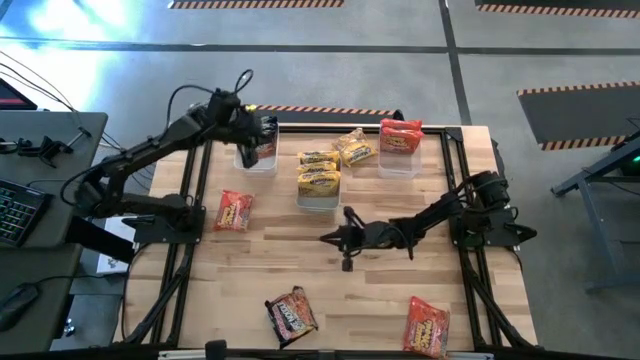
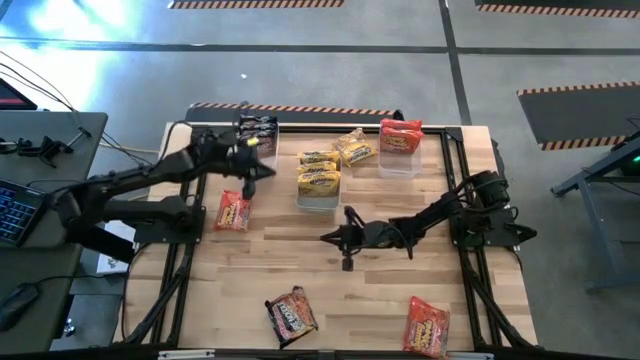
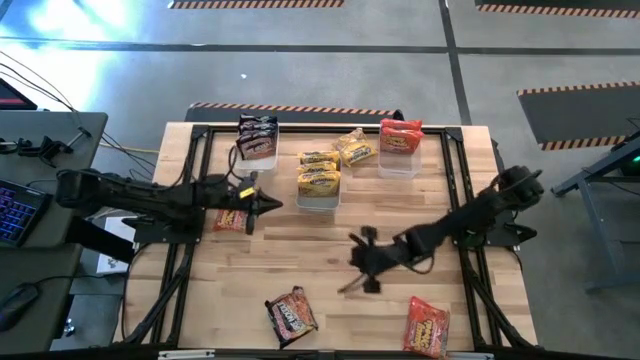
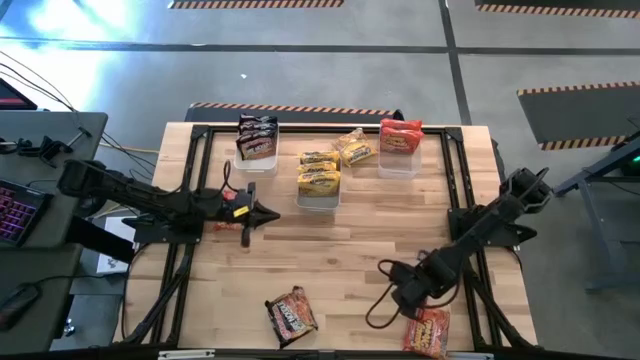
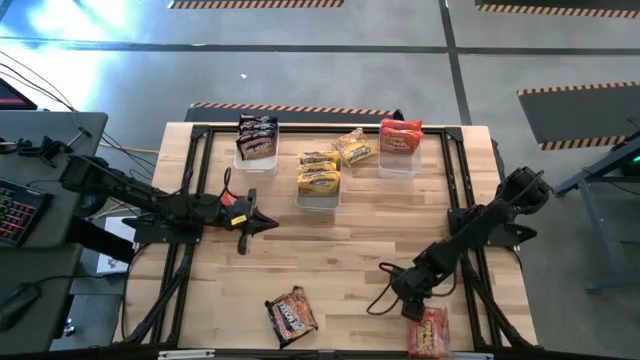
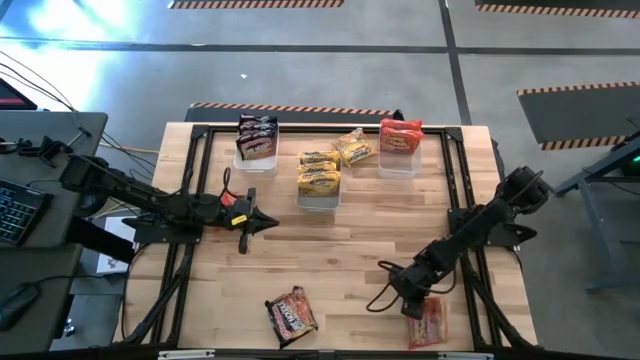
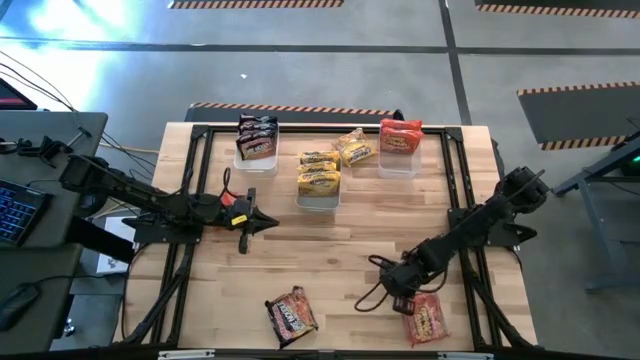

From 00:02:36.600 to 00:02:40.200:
Task: Sort Maruchan noodles
Put the bottom orange noodle pack into the transparent bin

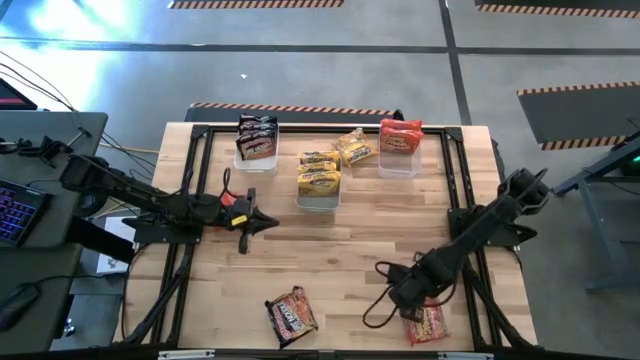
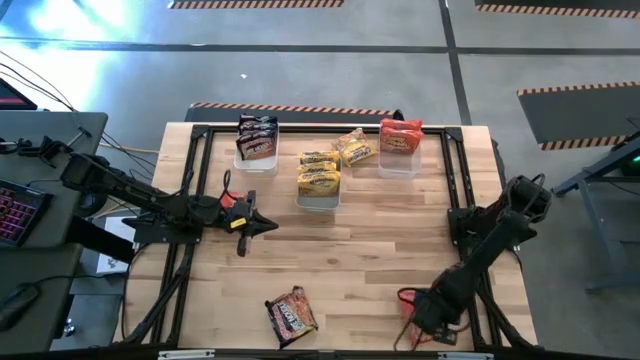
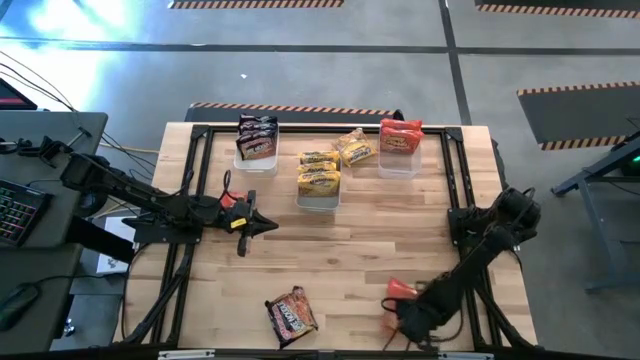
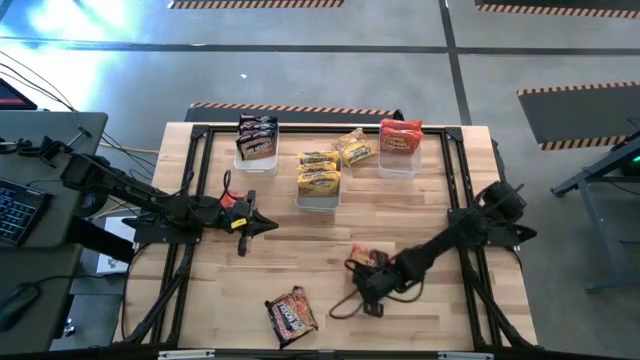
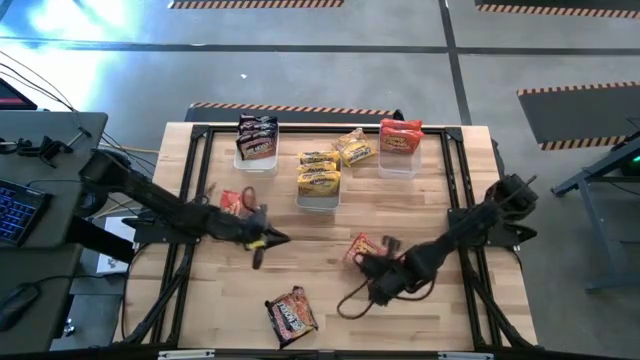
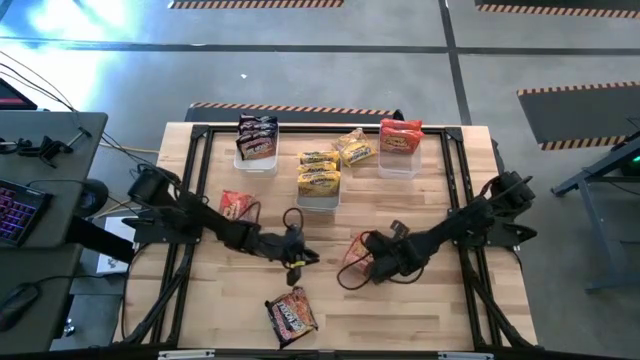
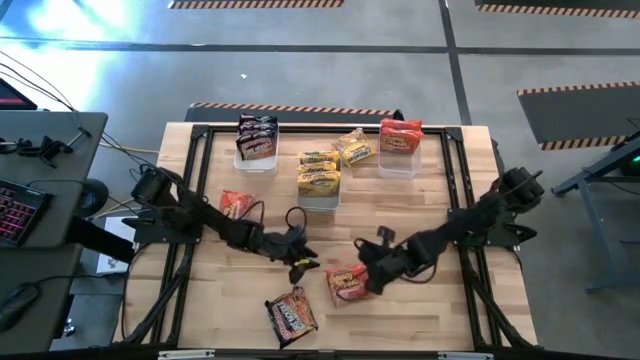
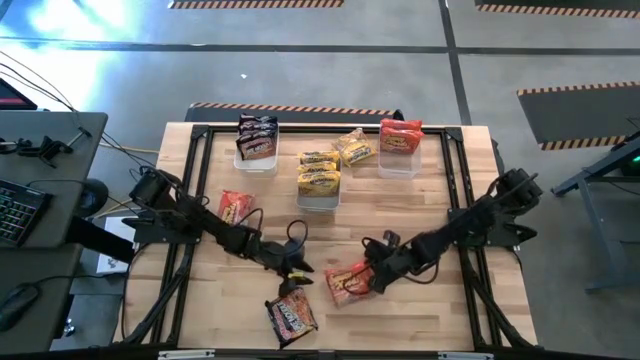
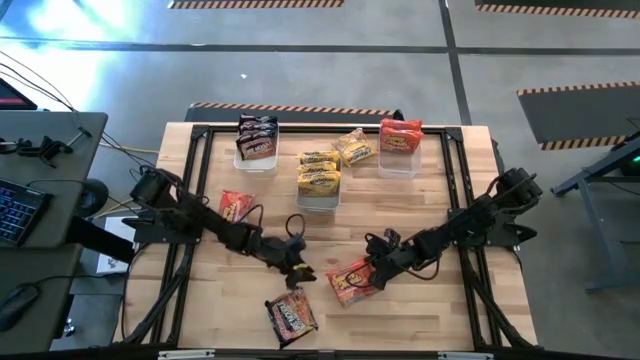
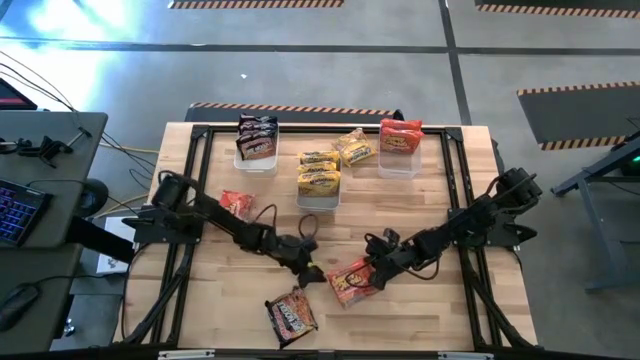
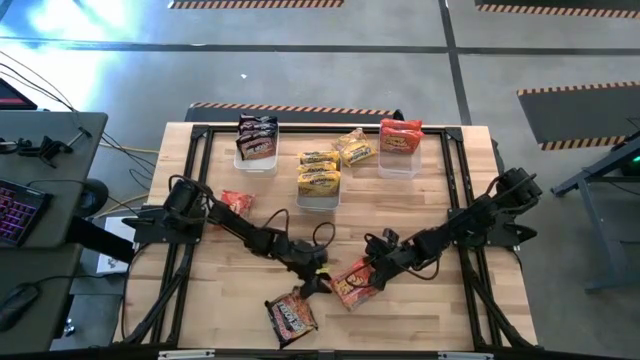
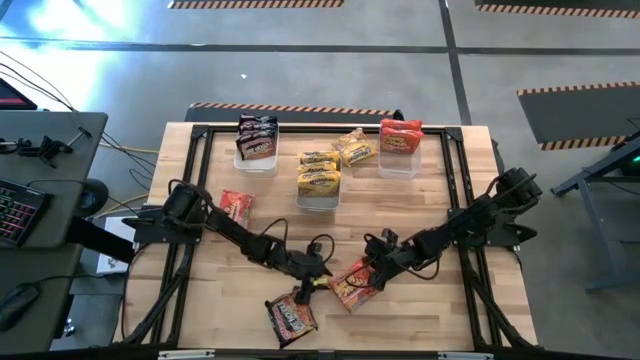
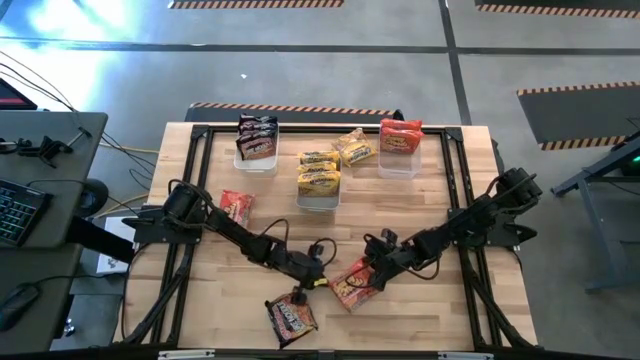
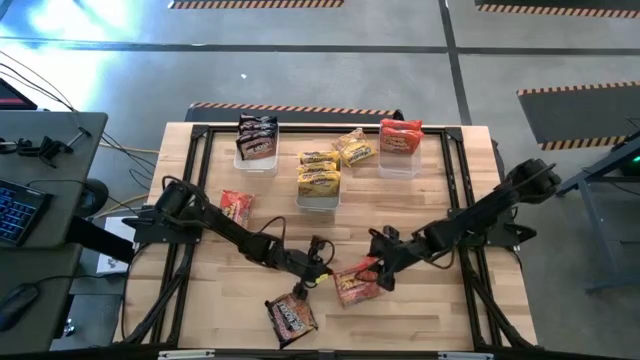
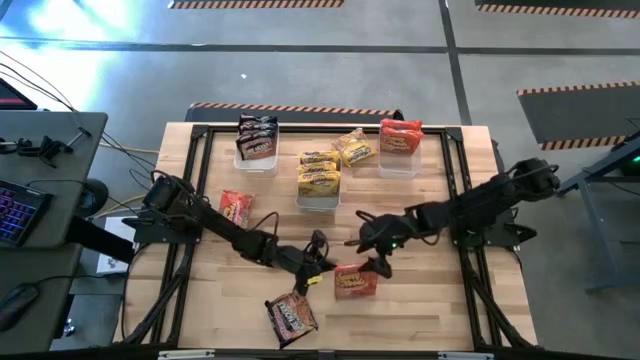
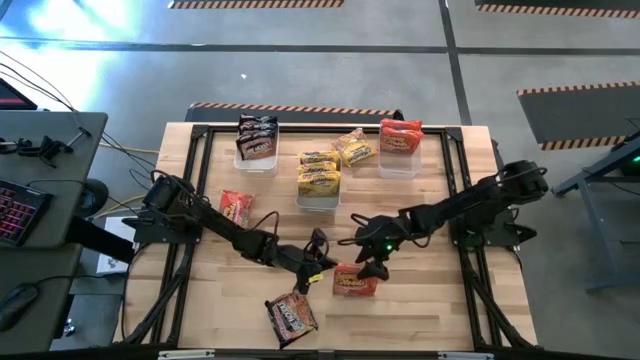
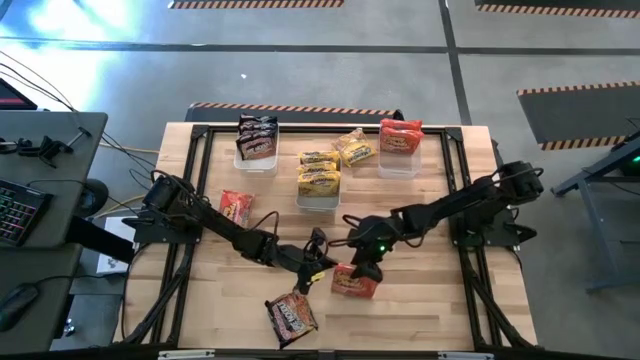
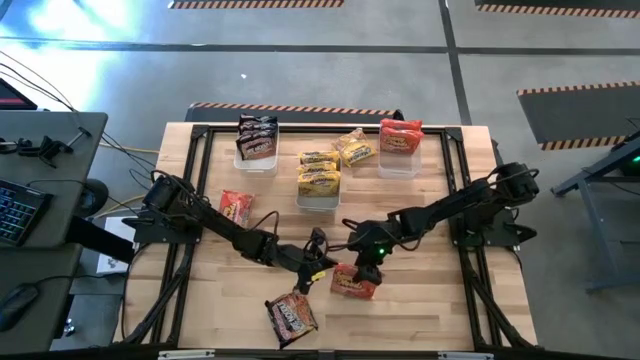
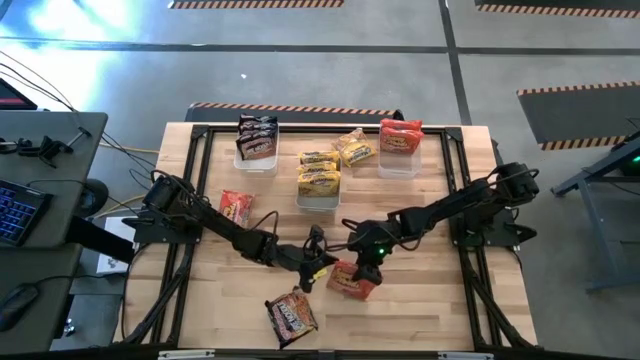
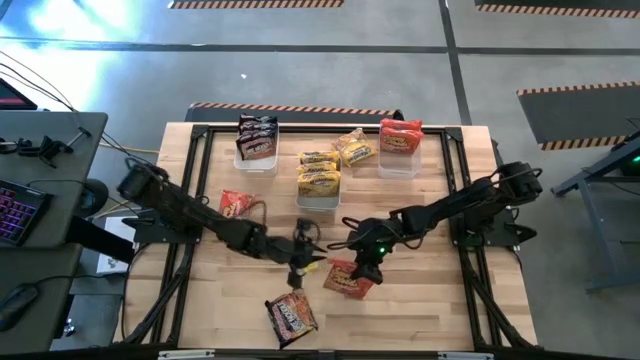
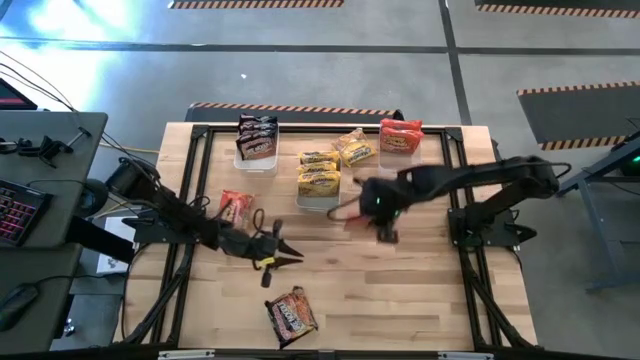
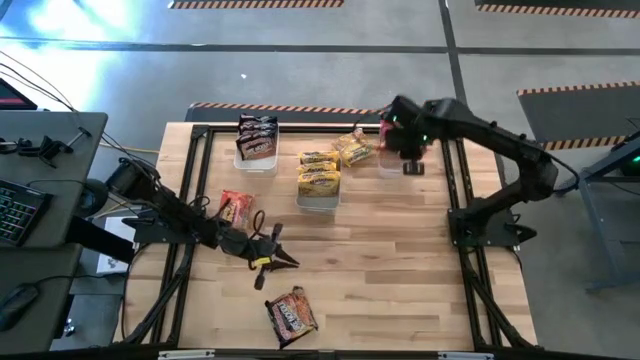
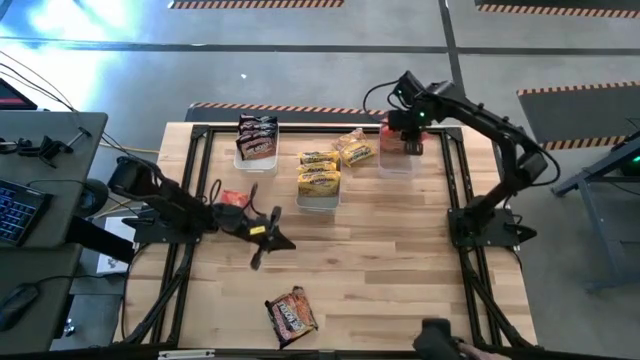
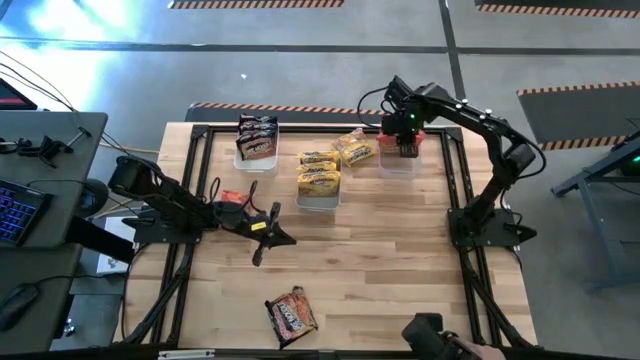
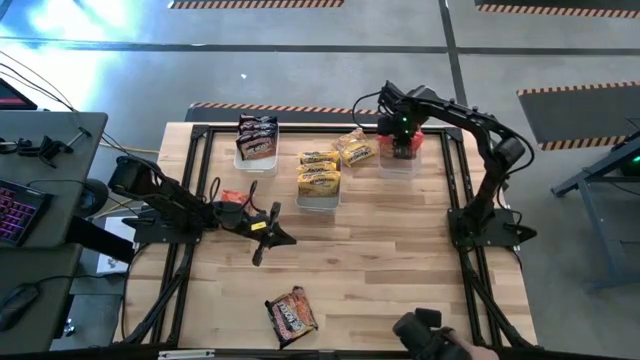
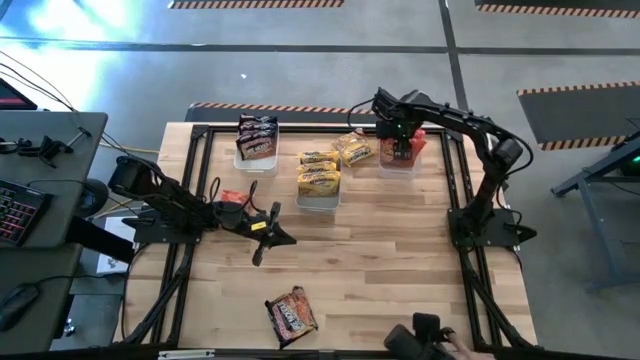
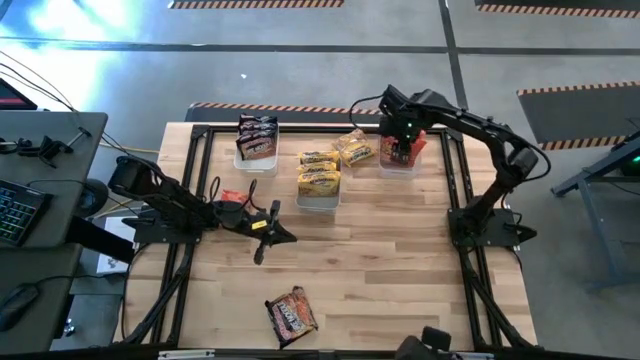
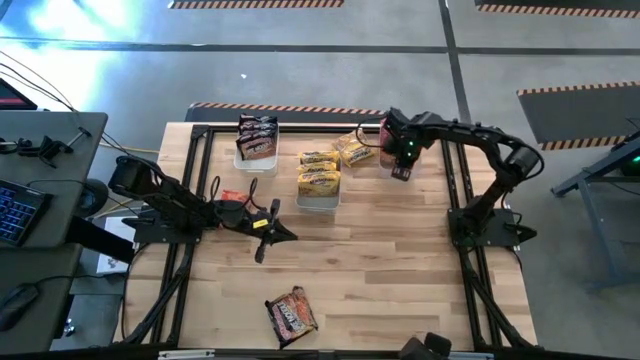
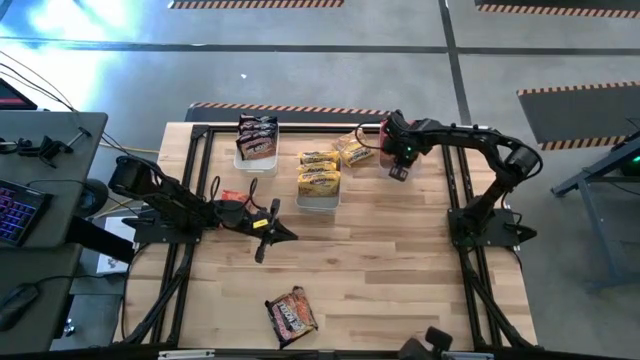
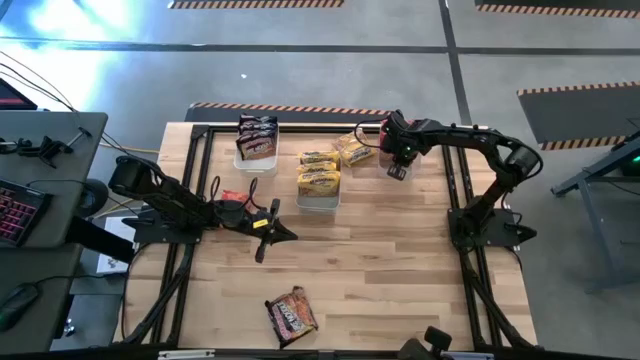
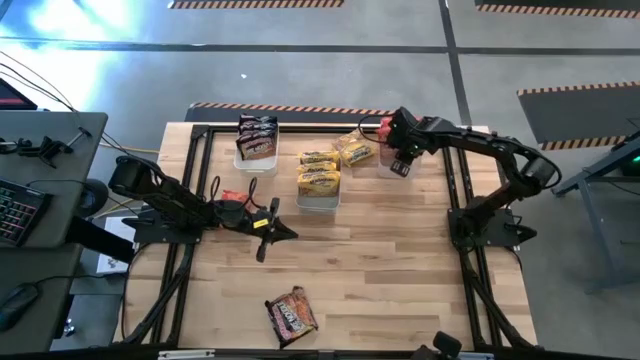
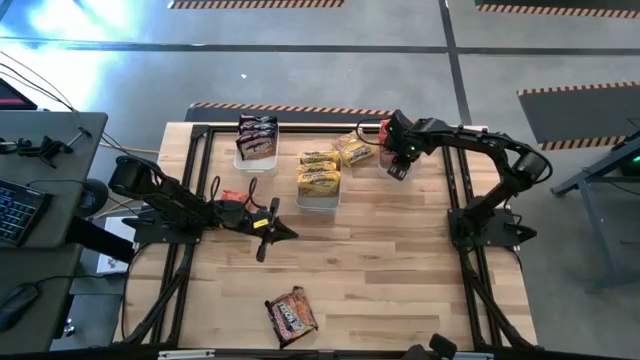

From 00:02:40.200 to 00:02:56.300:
Put the bottom orange noodle pack into the transparent bin

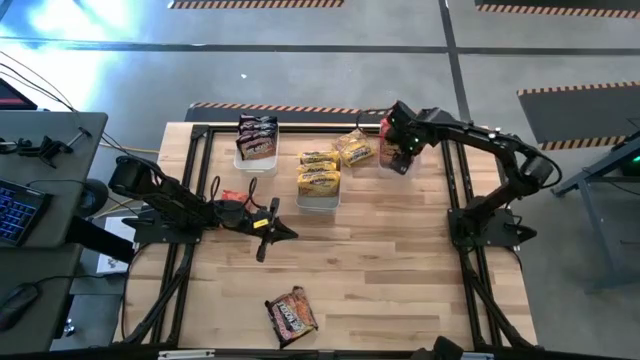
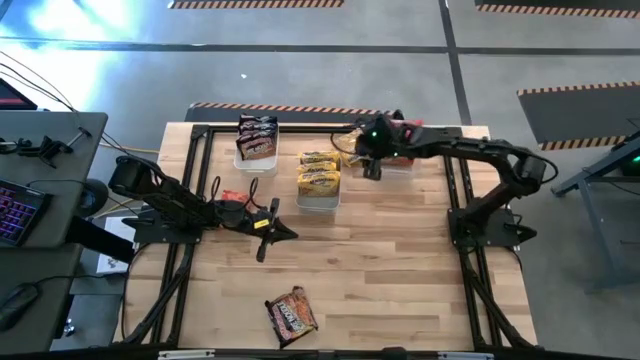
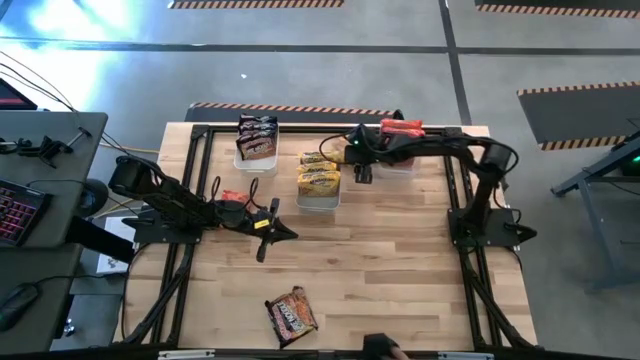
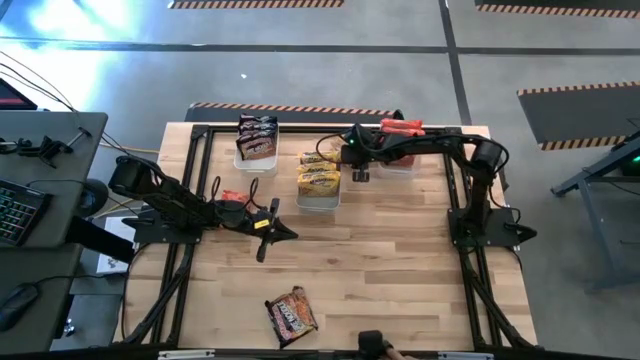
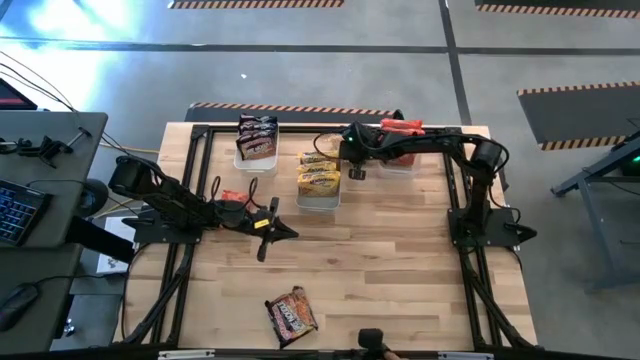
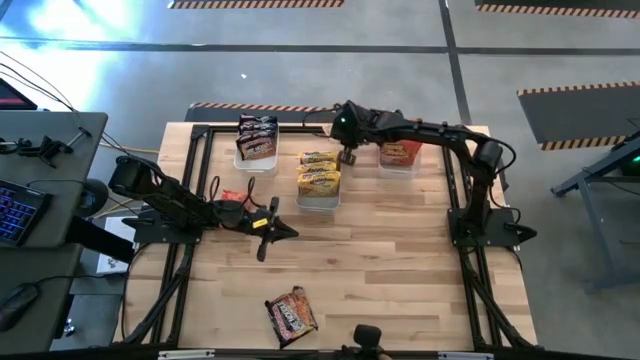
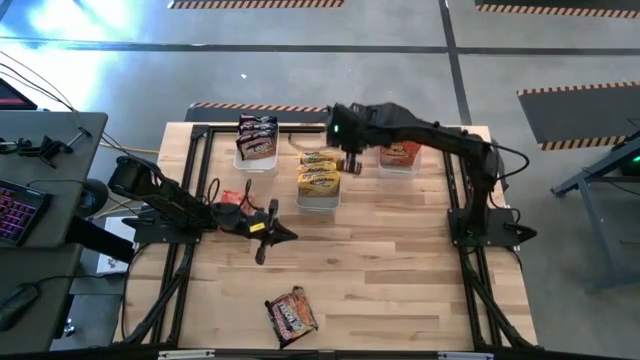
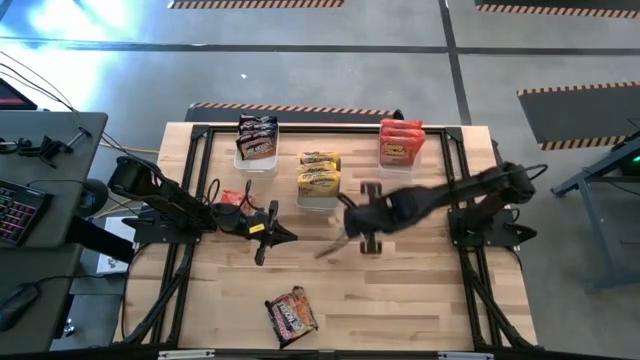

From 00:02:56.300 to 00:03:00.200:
Put the yellow noodle pack into the gray bin
